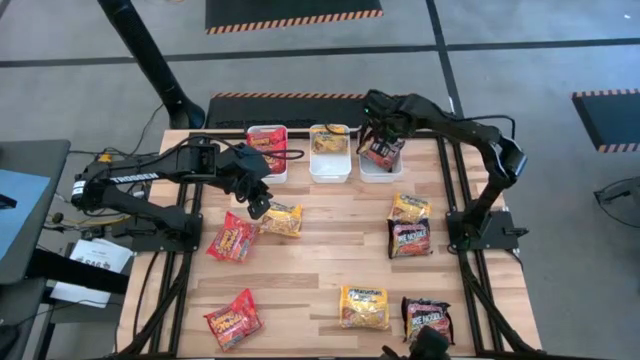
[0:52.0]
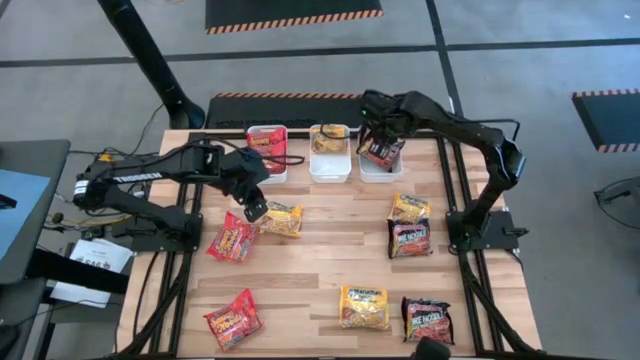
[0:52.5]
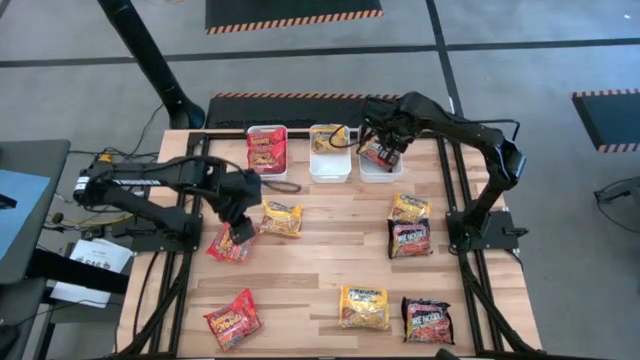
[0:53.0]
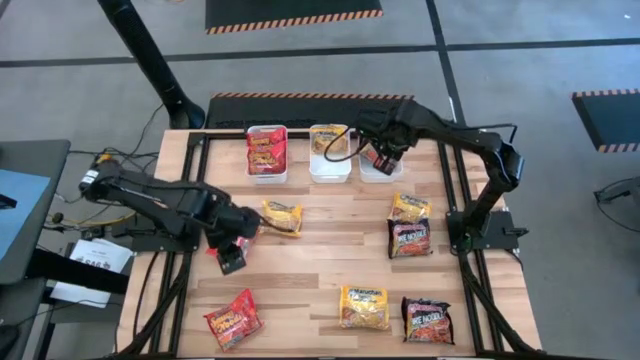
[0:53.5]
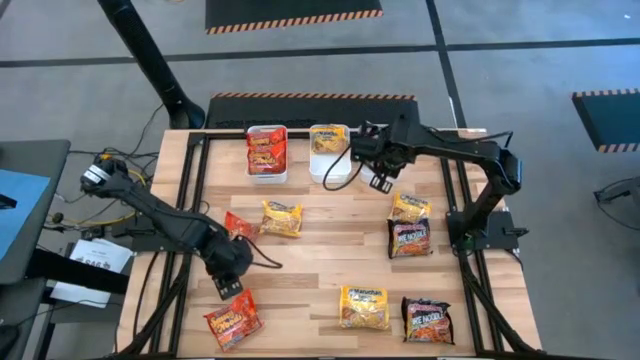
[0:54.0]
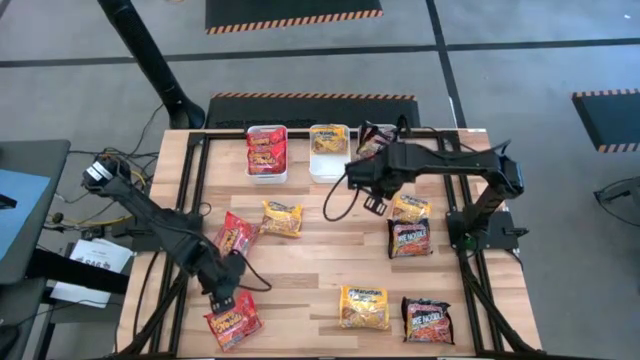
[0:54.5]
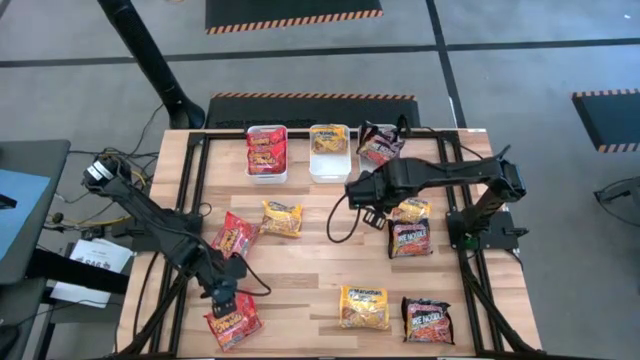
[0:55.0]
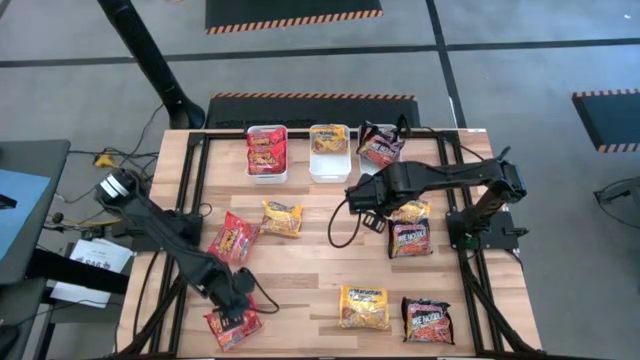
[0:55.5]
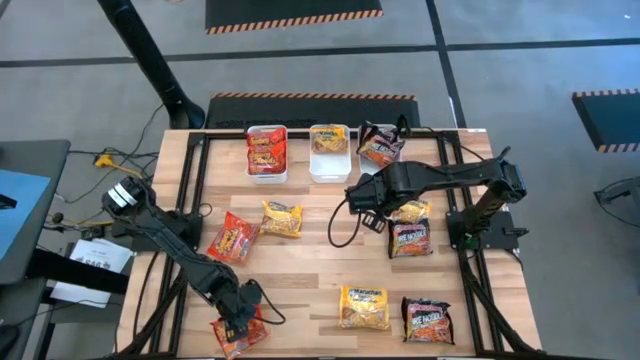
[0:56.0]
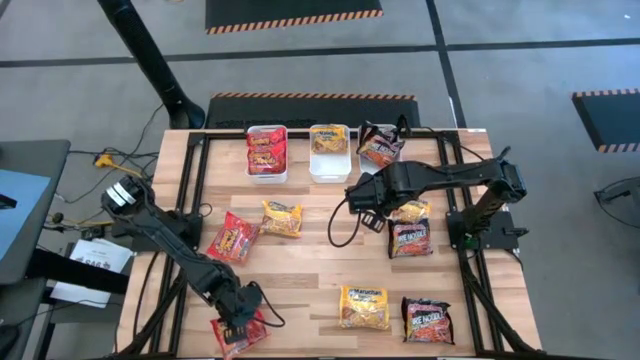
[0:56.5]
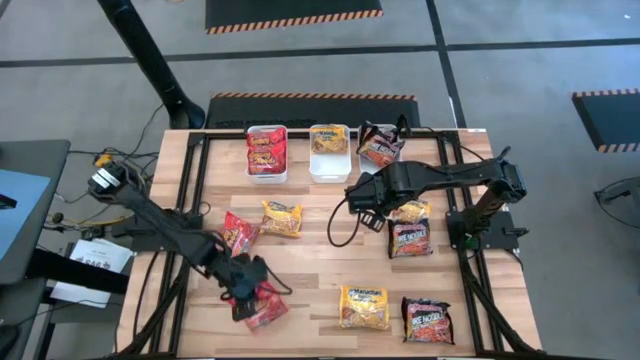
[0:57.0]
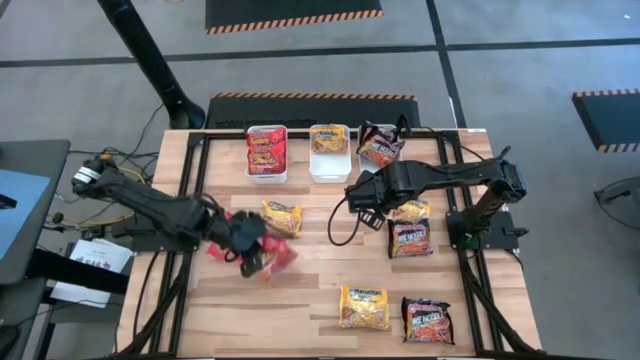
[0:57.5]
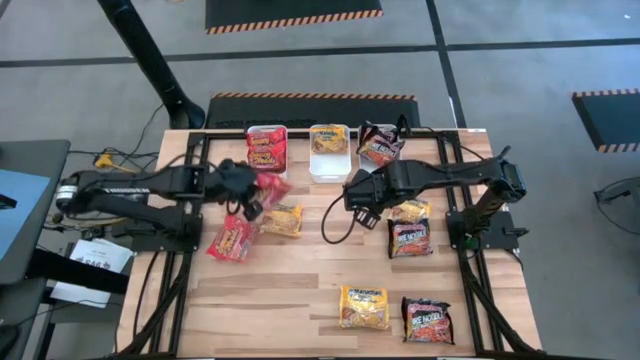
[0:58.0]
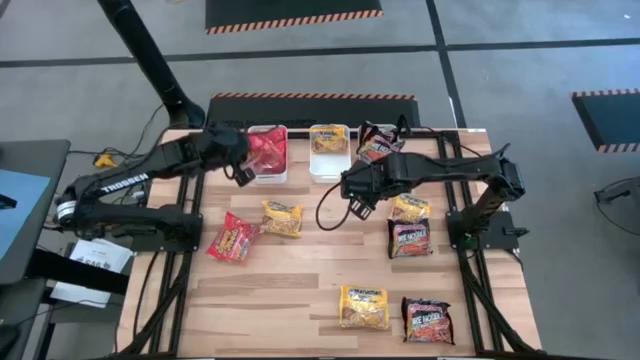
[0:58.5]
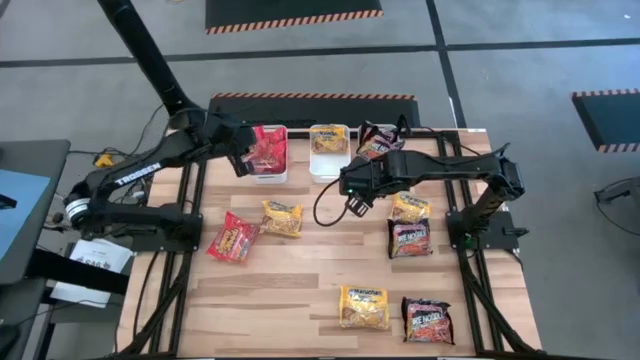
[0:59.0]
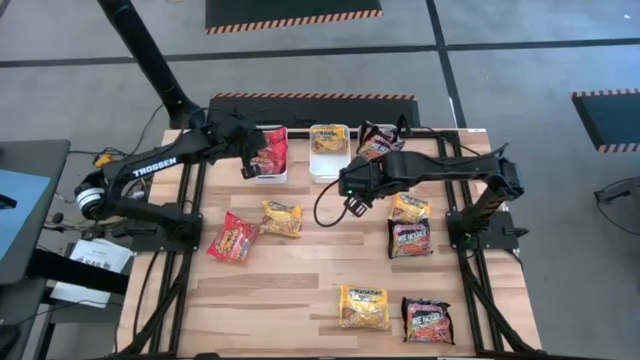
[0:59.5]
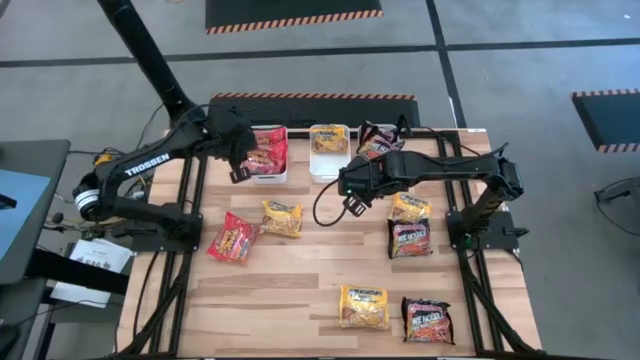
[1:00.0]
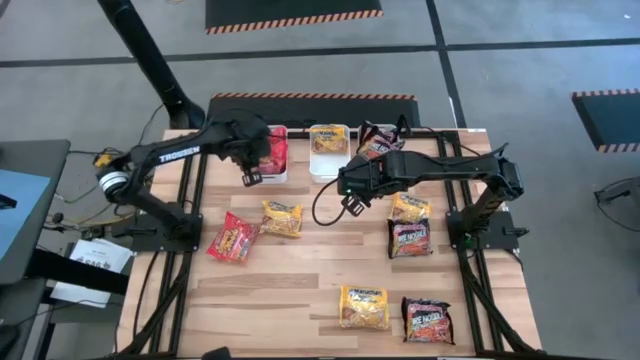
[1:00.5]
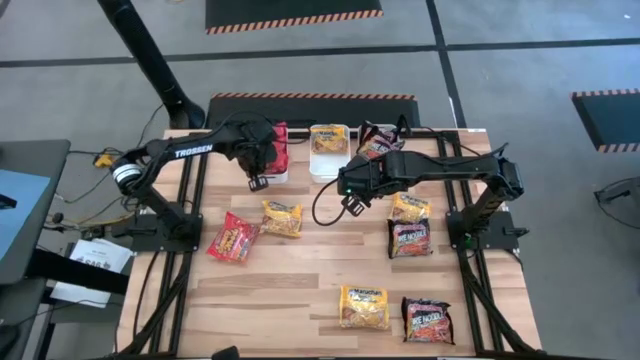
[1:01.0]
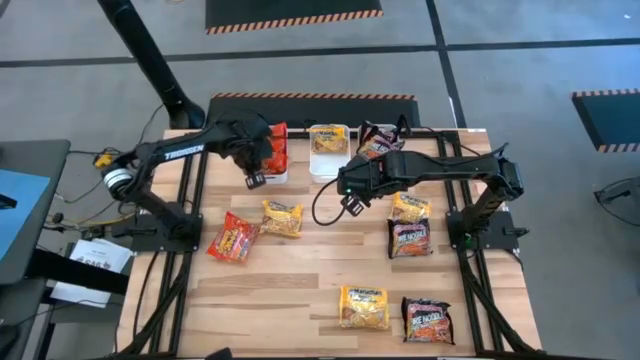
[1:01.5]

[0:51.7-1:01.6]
Task: Sort Maruchan noodles
Put the orange noodle pack into the left white bin

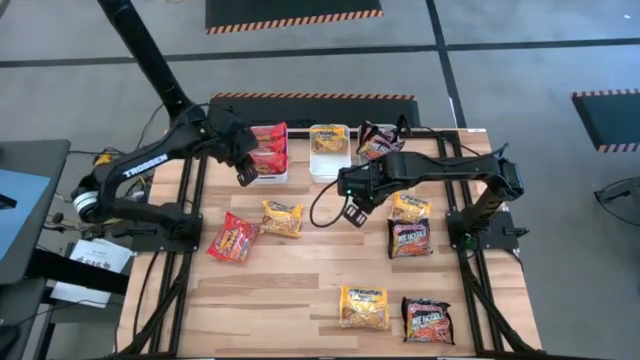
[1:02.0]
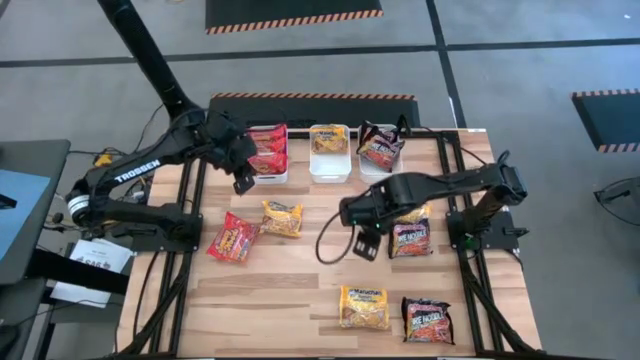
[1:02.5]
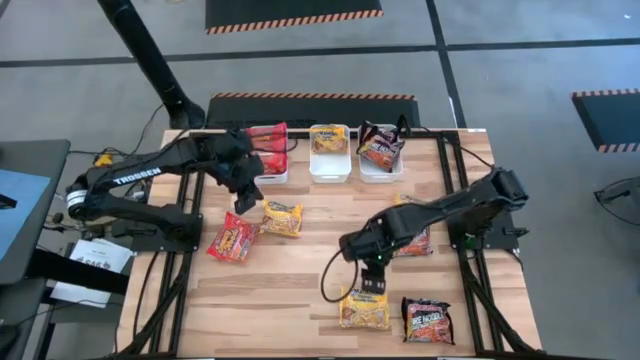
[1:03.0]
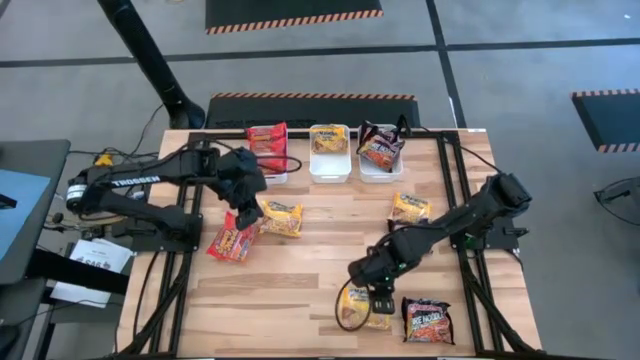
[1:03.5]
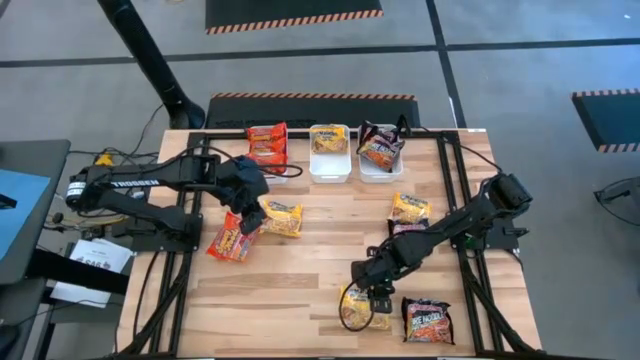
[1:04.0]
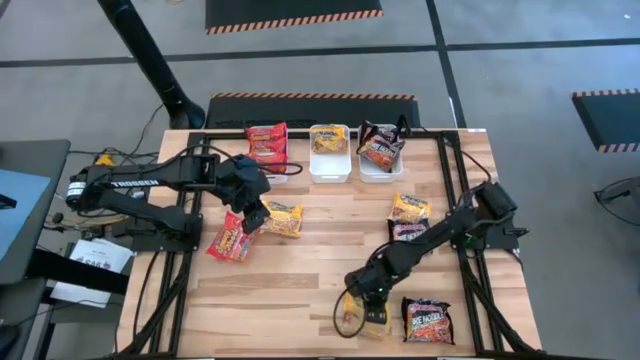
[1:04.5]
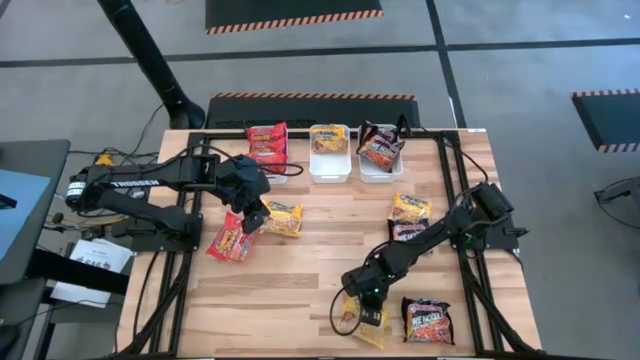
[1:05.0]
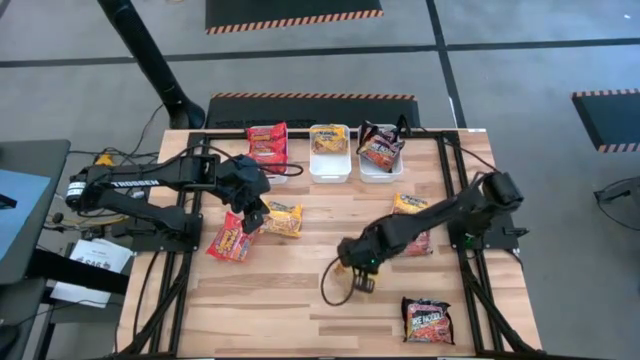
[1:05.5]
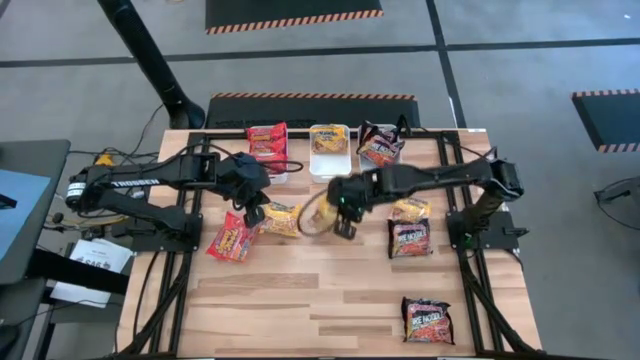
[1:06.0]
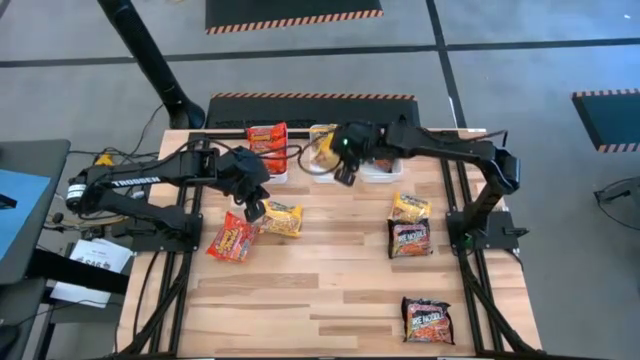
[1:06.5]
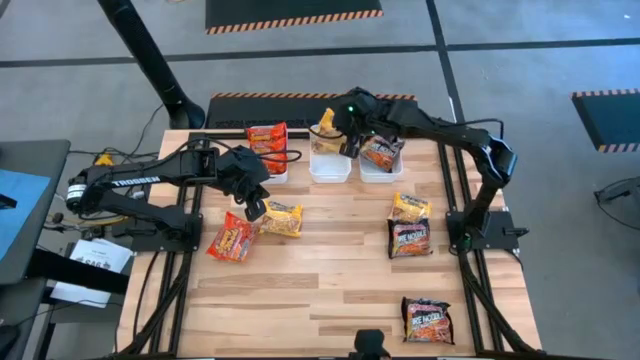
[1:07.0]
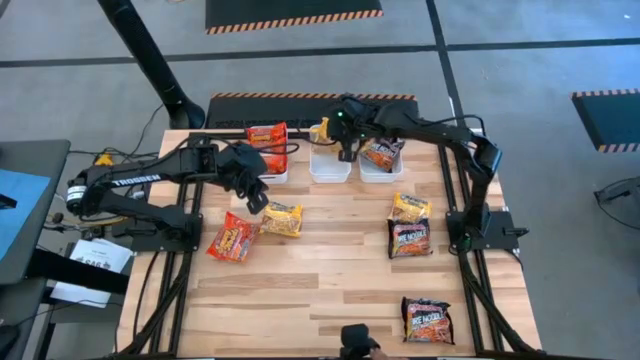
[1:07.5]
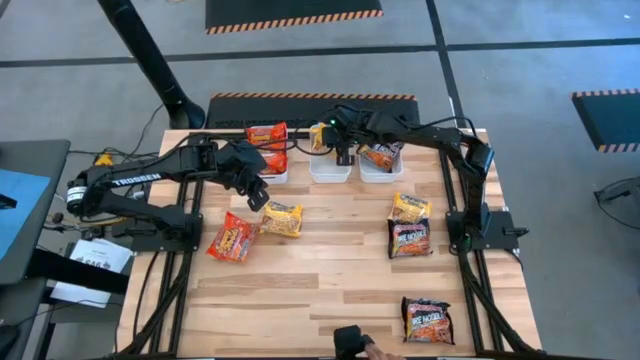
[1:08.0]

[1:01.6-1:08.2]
Put the yellow noodle pack into the middle white bin

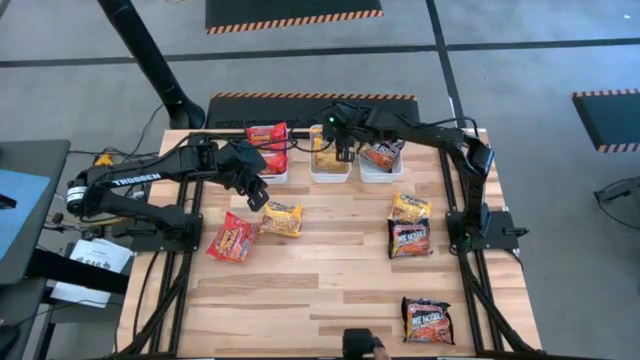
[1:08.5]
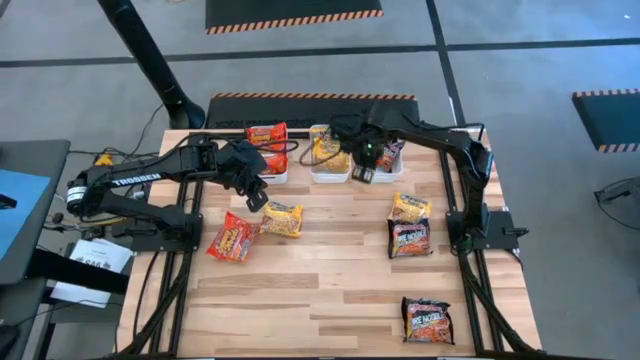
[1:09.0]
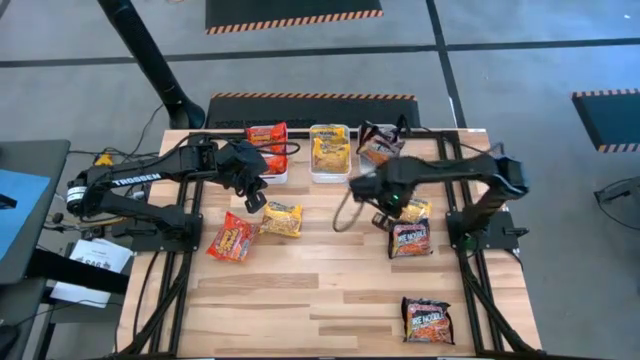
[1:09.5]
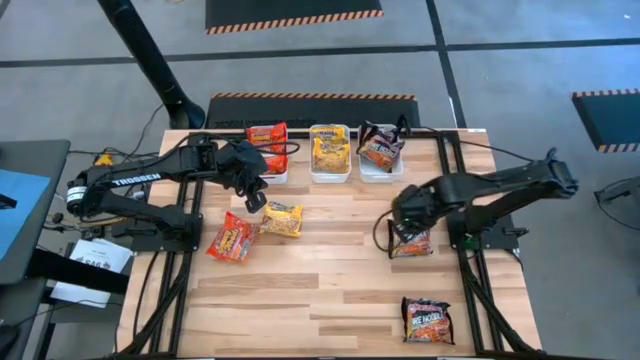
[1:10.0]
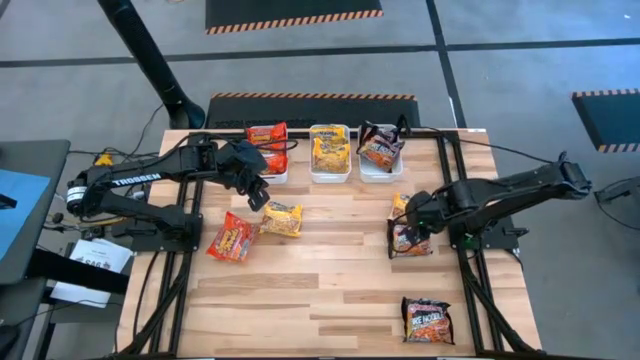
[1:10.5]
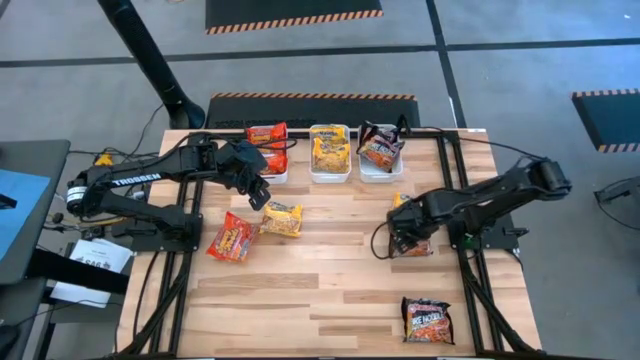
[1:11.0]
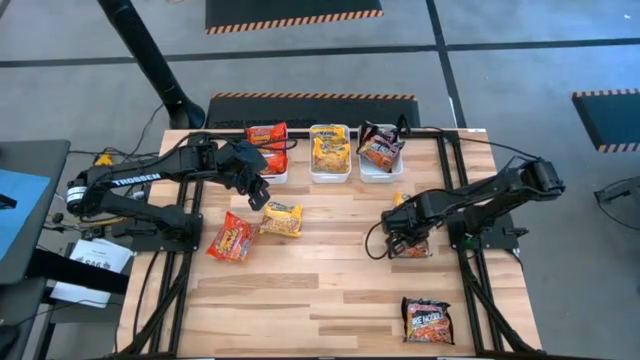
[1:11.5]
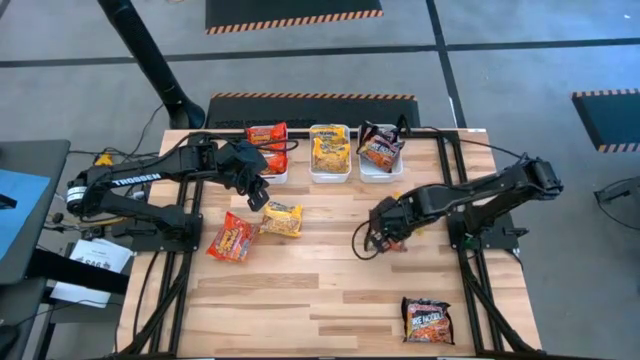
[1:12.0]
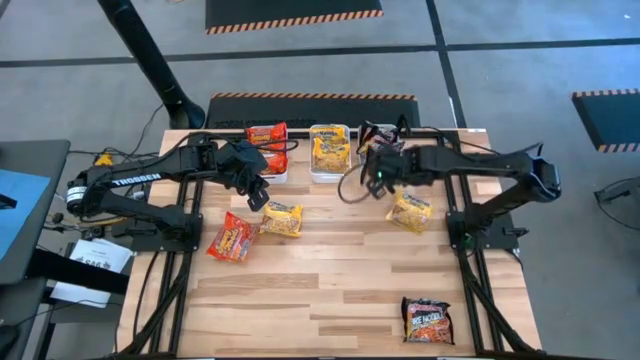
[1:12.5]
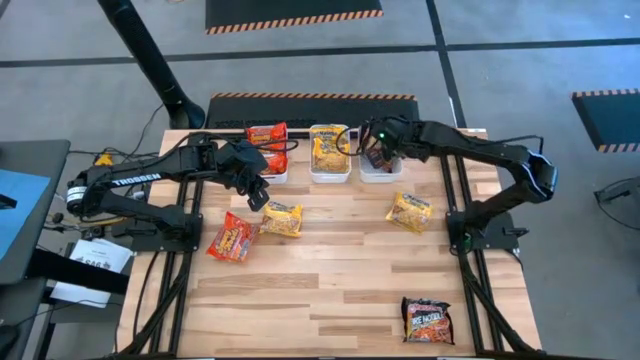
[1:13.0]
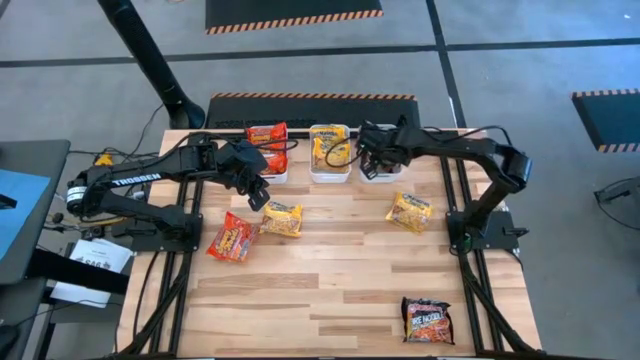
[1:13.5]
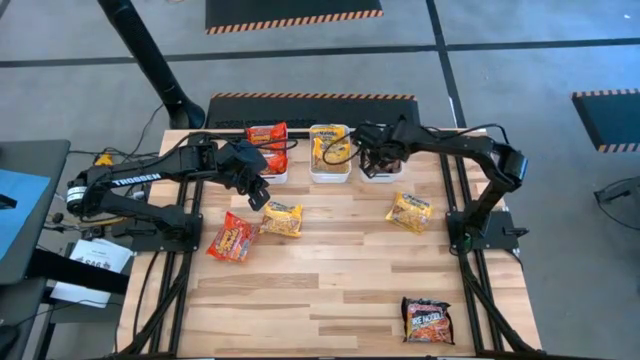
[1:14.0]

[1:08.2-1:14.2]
Put the black noodle pack into the right white bin
